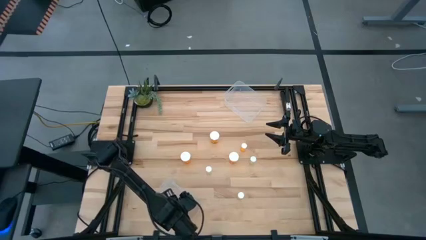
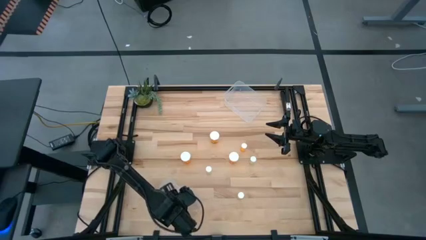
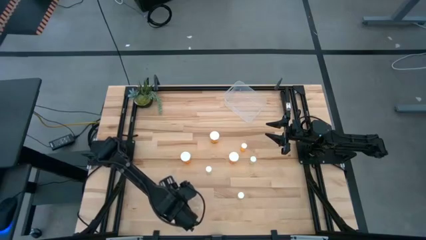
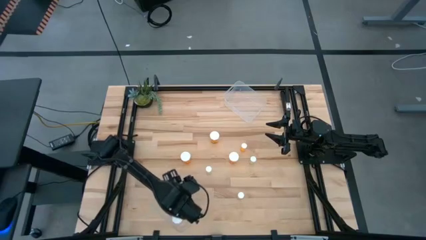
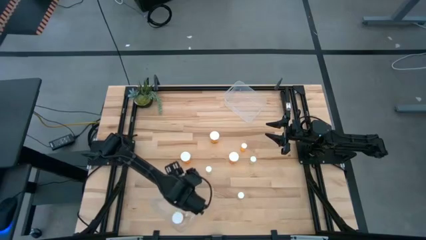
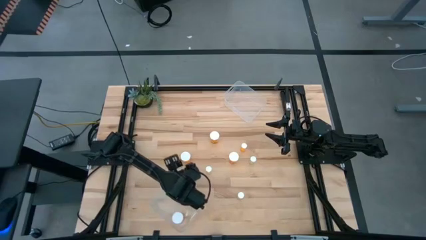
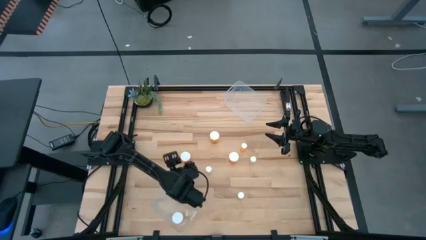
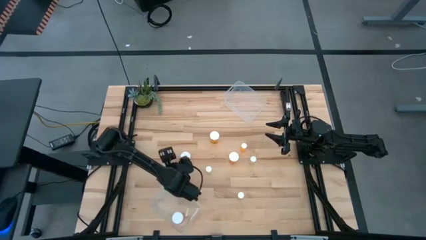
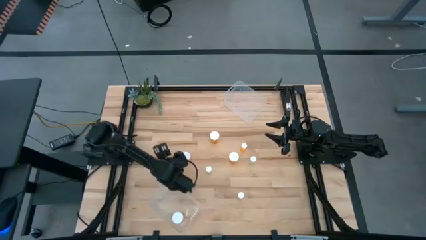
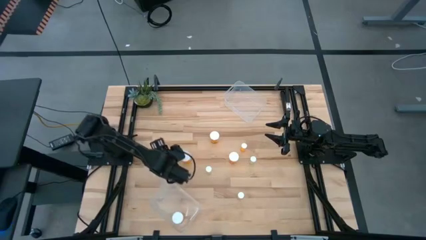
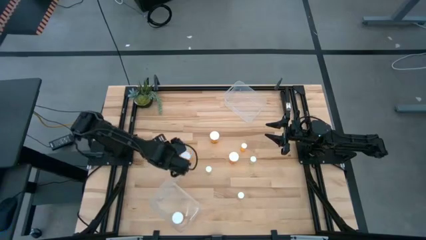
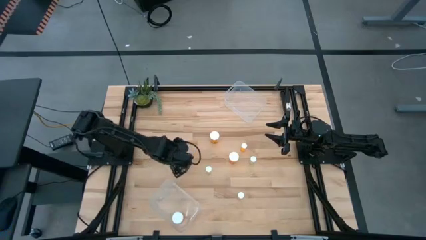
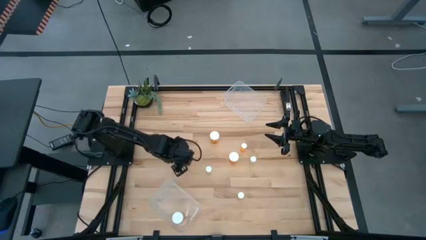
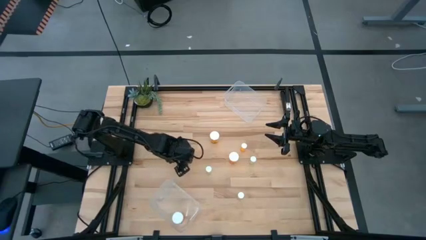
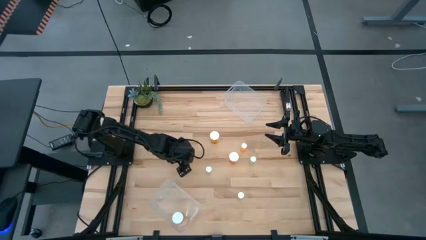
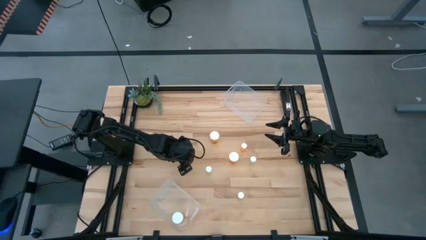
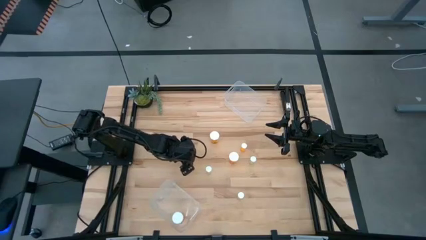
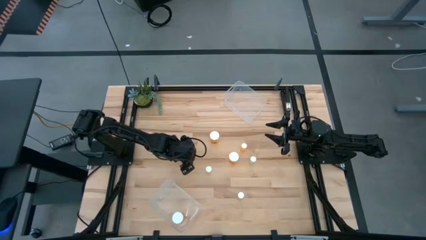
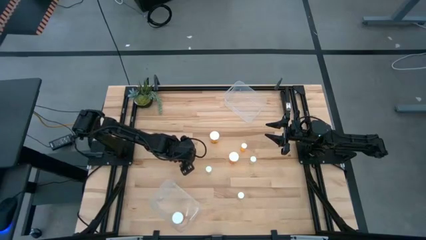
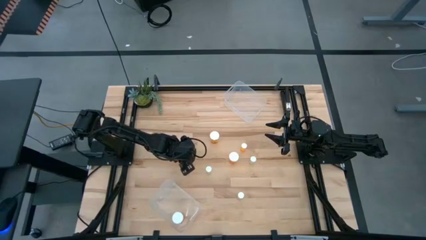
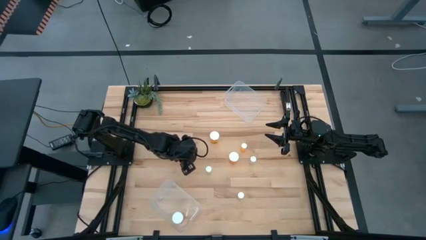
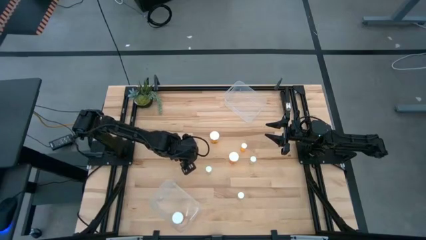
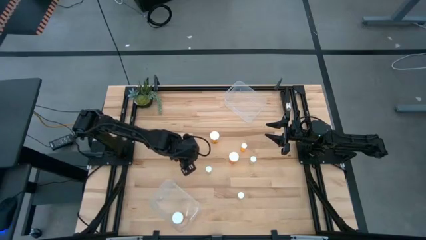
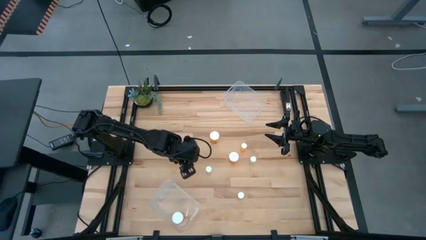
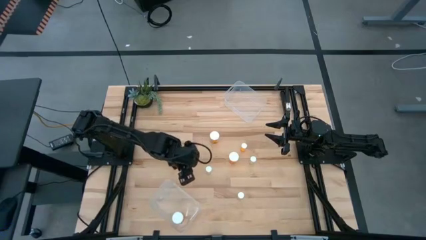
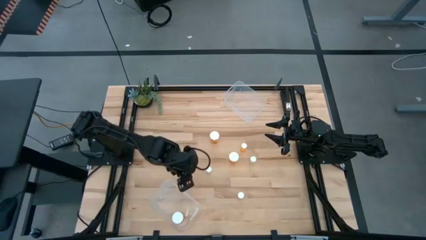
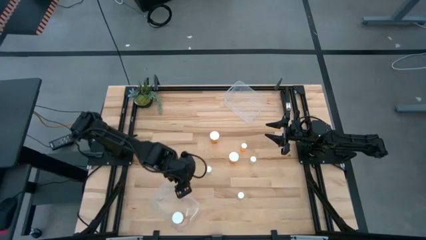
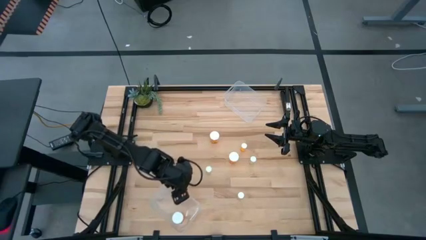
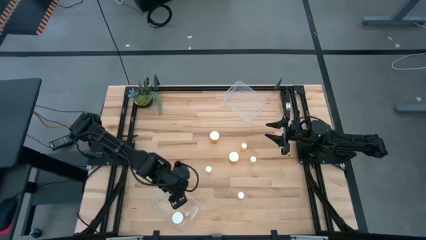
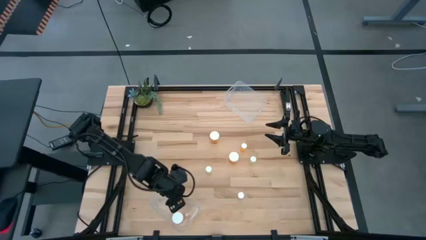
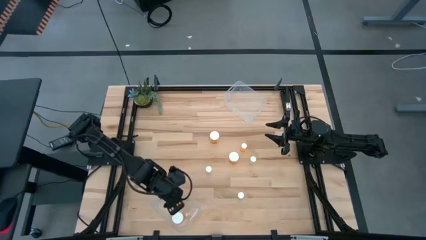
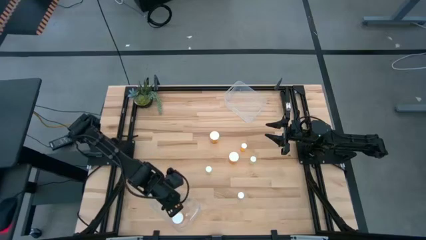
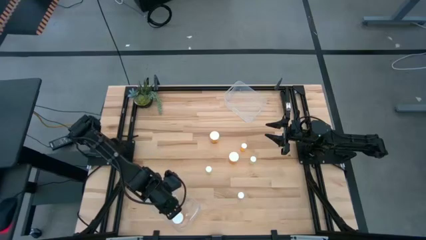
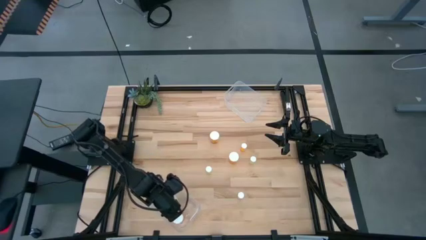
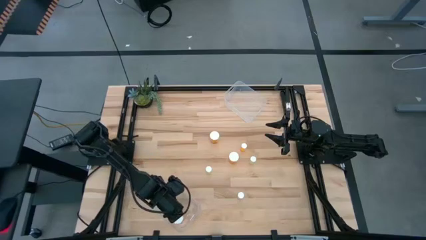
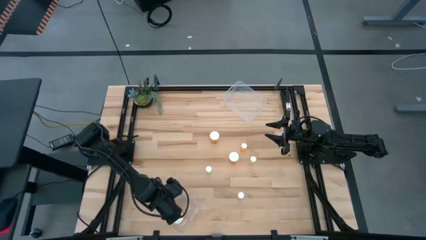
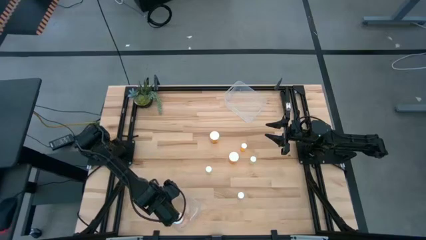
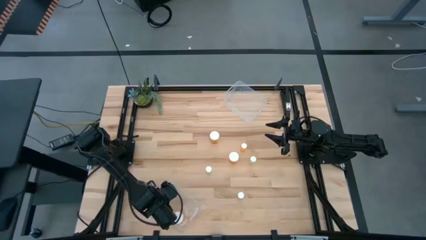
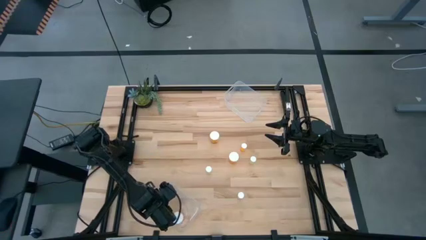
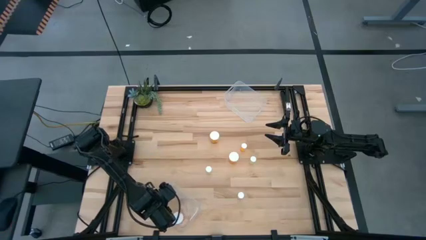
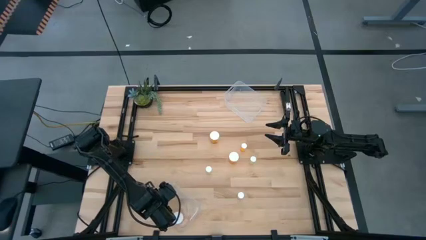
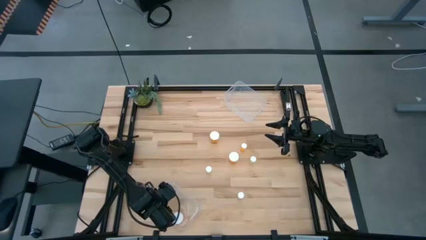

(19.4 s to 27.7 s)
Task: Pick and place medicine bottles into bin by pill shape (circle, oval)
Put the orange capsule bottle into the bottom transparent bin

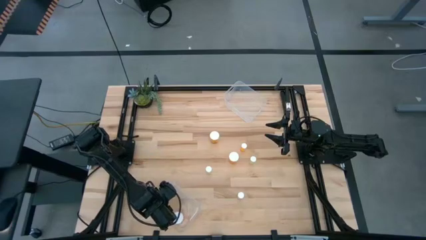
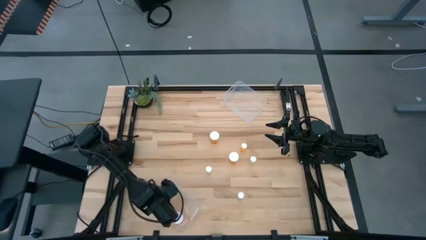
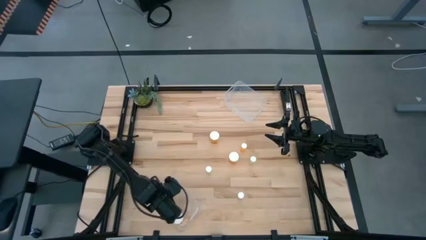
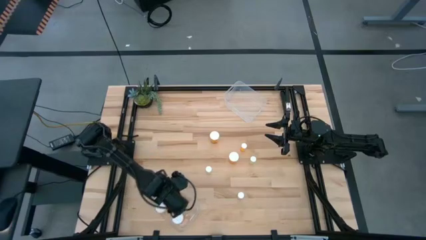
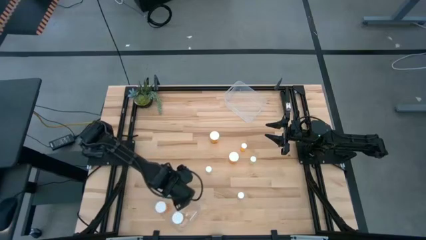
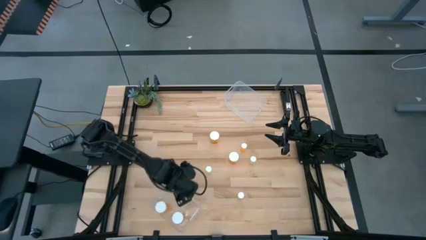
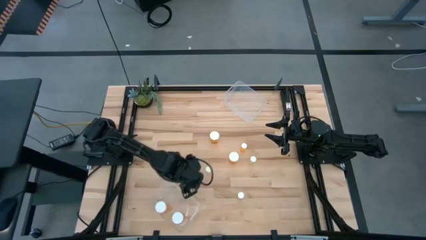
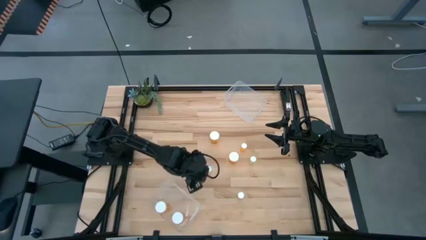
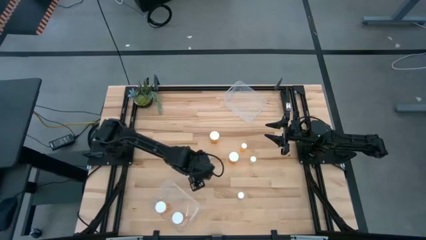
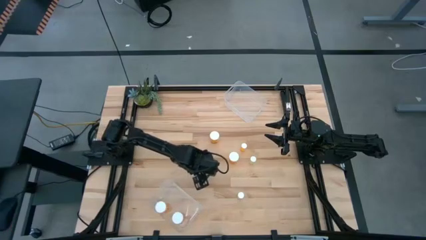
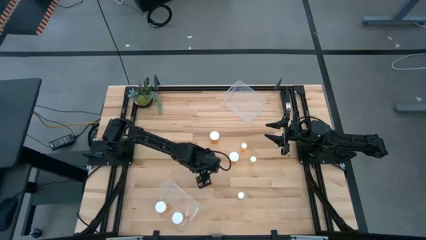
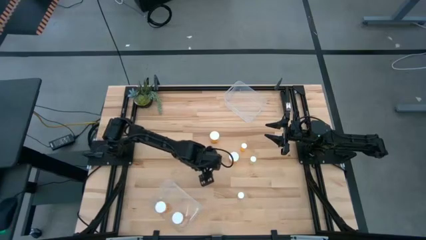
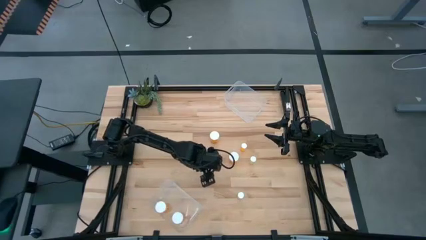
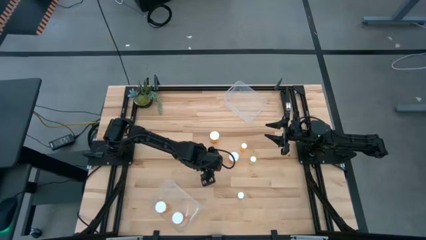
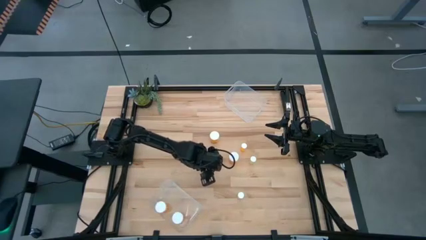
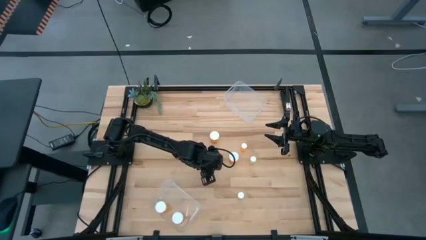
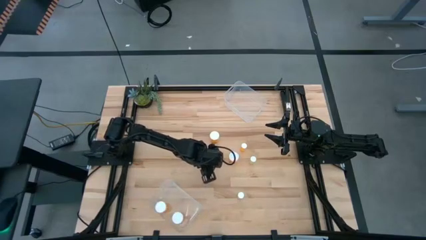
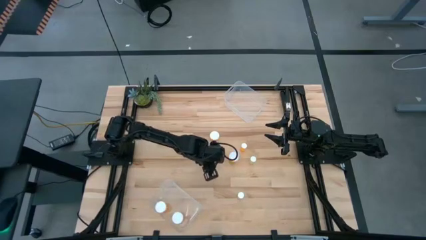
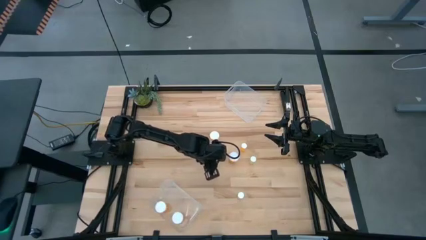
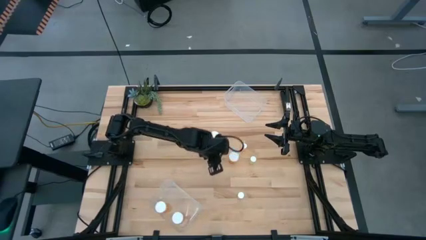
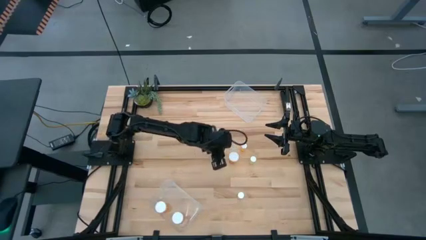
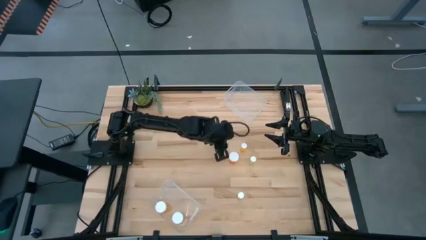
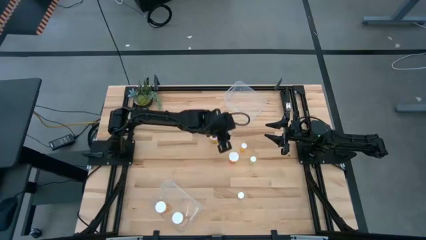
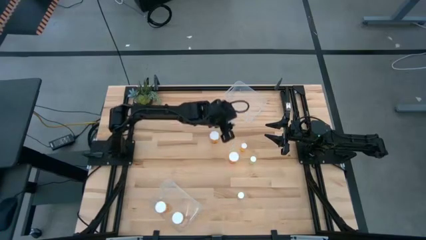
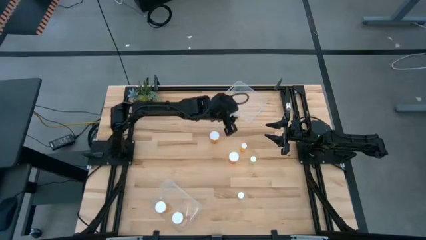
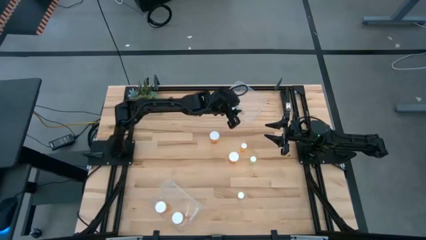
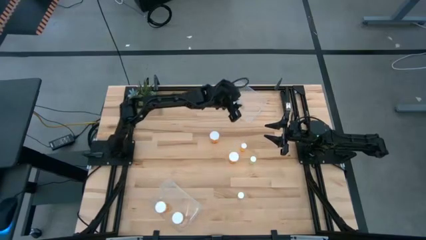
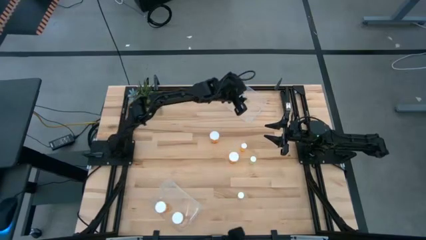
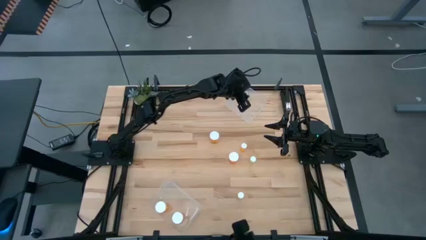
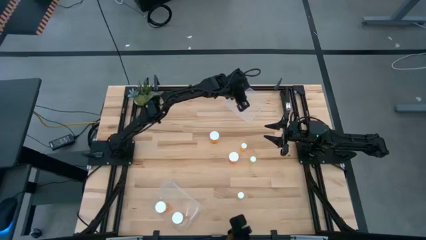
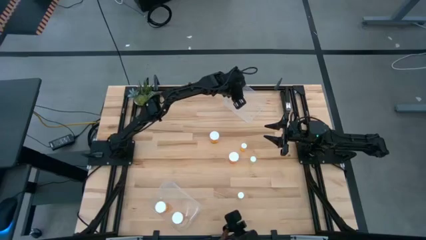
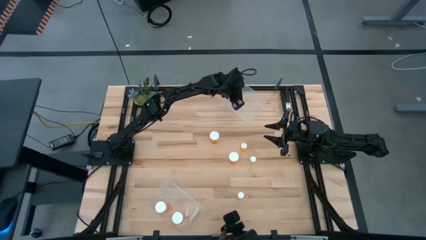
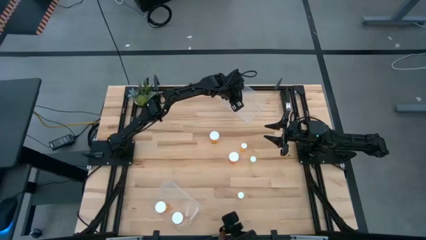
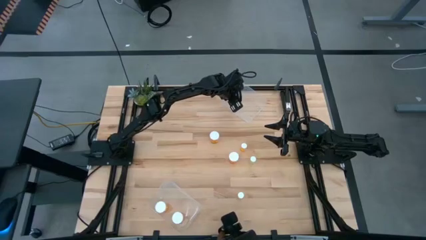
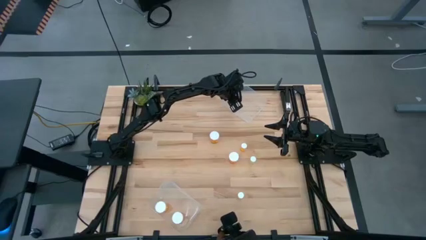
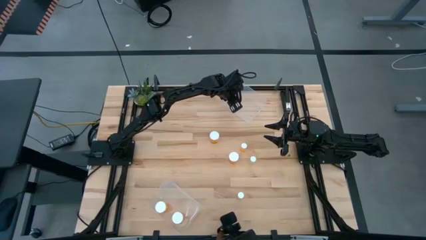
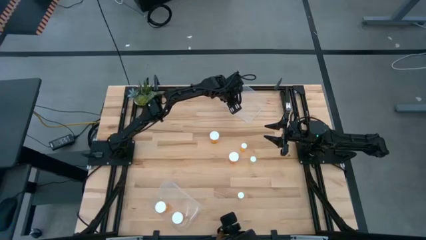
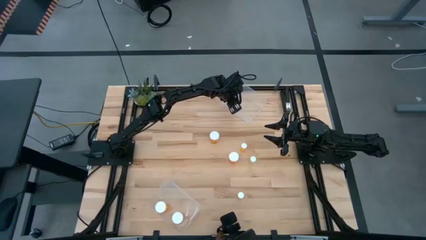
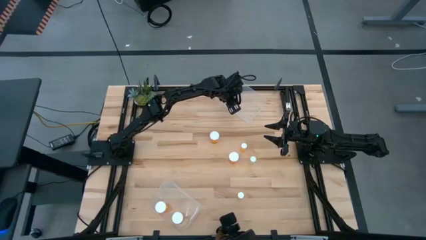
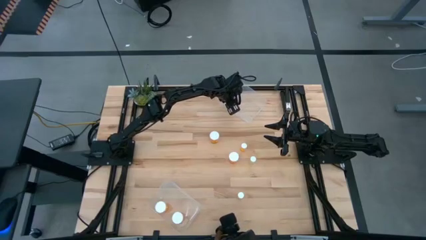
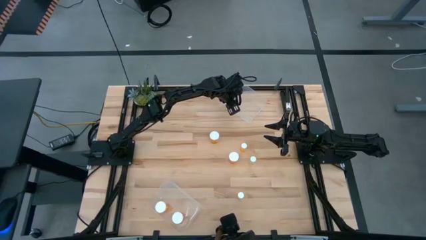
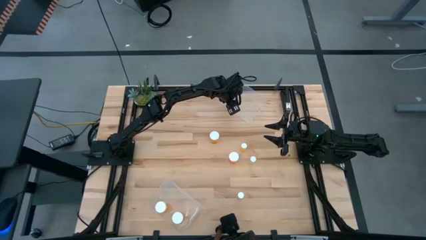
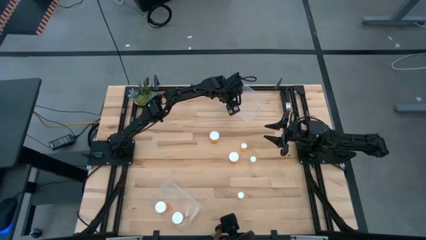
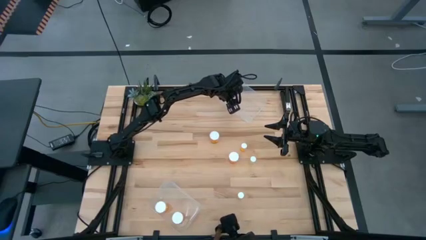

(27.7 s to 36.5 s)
Put the yellow tablet bottle into the top transparent bin
